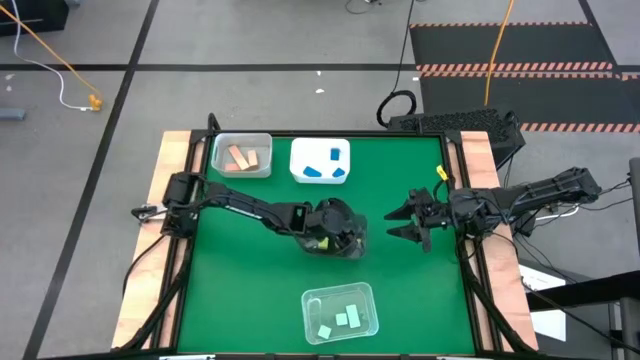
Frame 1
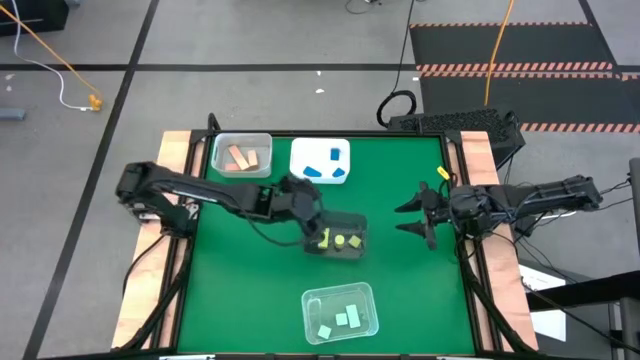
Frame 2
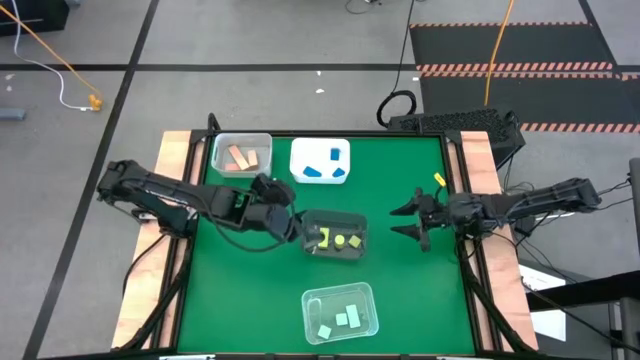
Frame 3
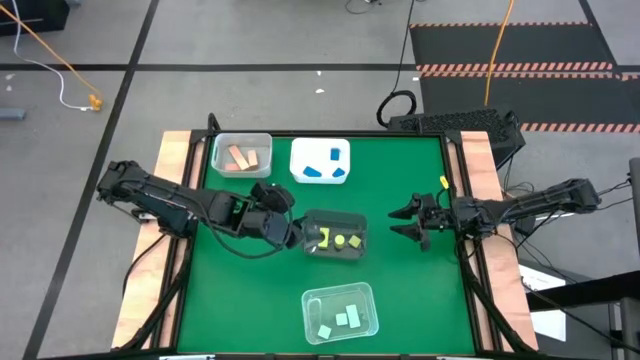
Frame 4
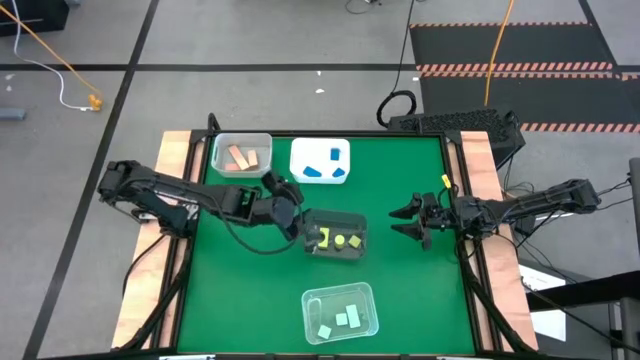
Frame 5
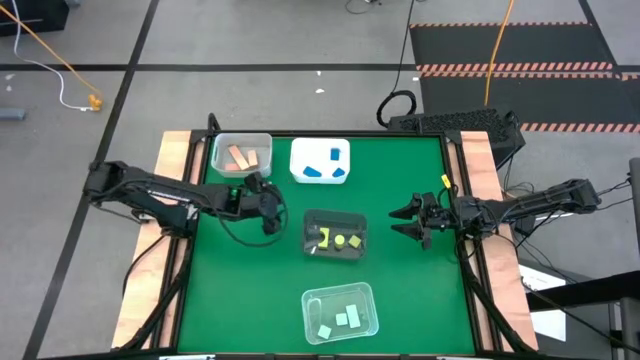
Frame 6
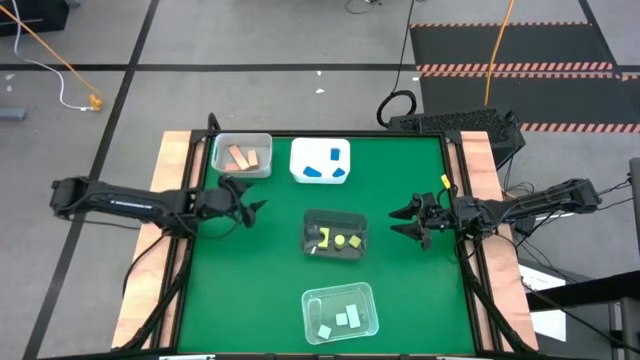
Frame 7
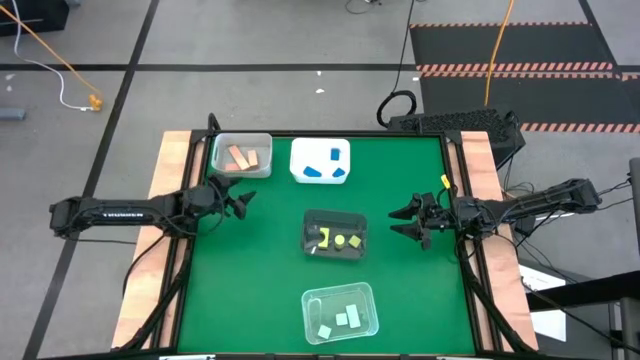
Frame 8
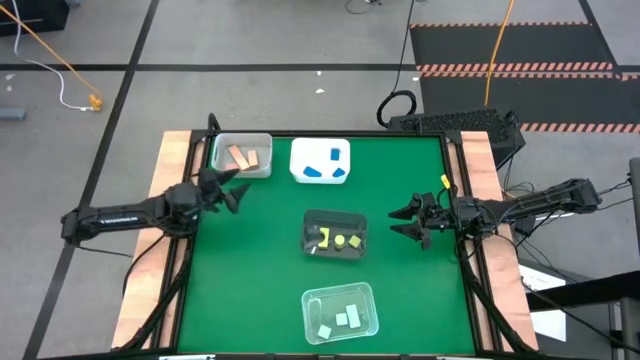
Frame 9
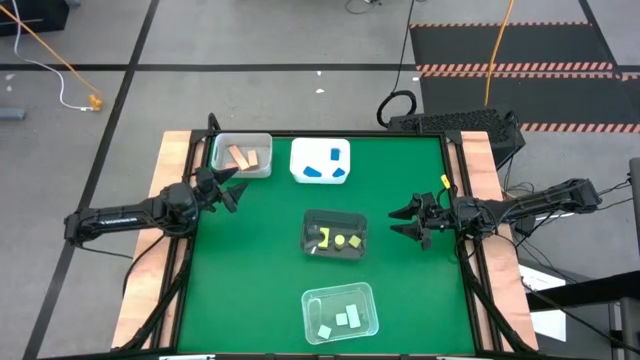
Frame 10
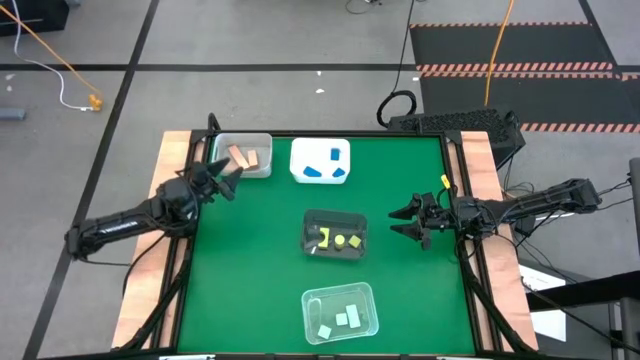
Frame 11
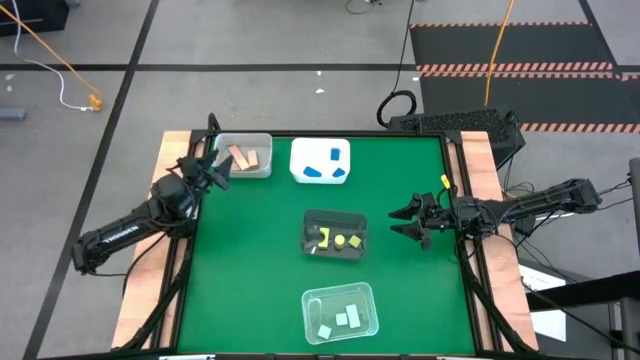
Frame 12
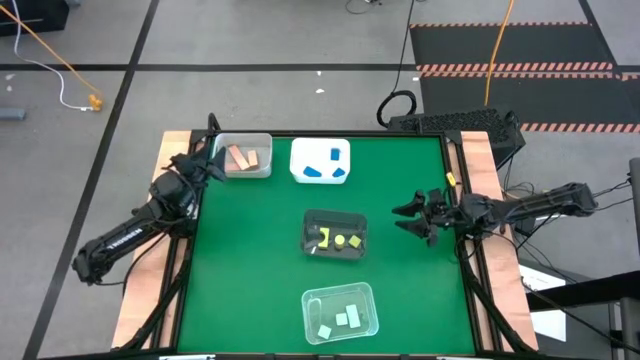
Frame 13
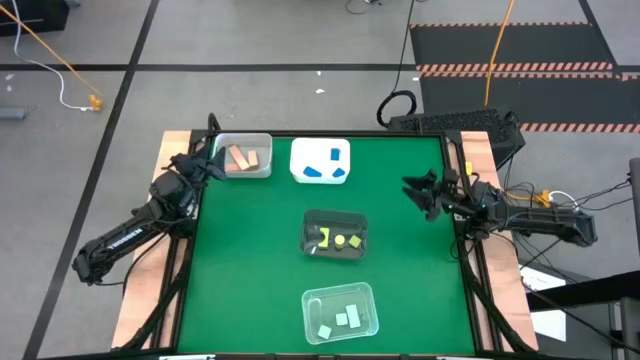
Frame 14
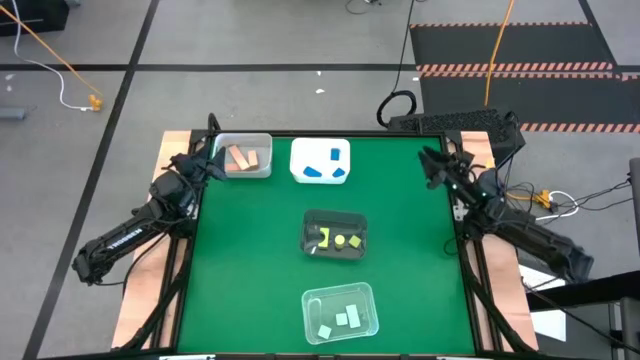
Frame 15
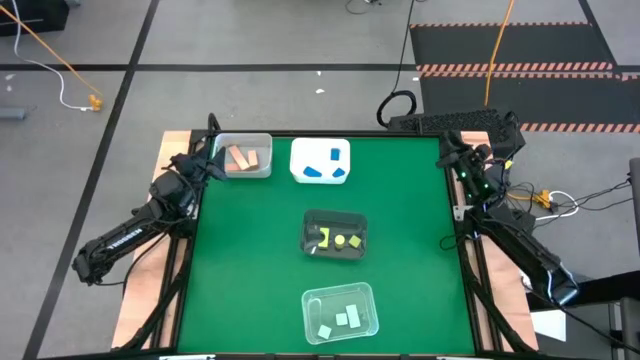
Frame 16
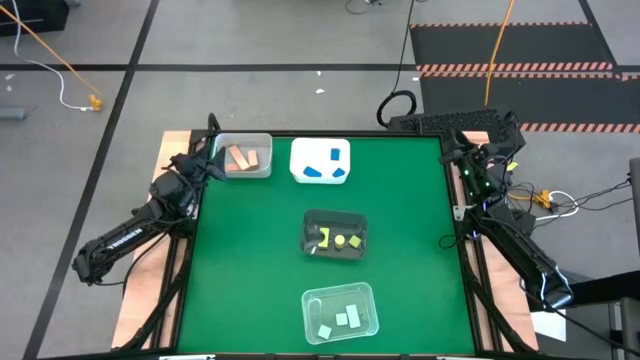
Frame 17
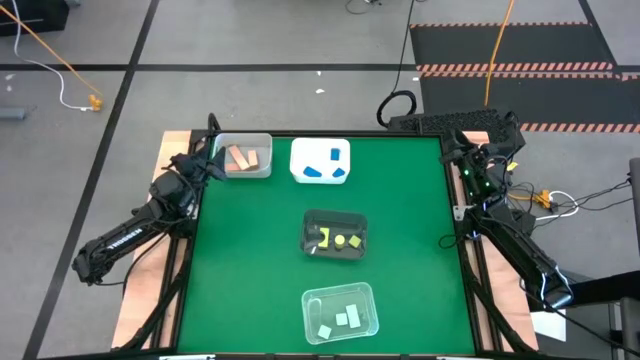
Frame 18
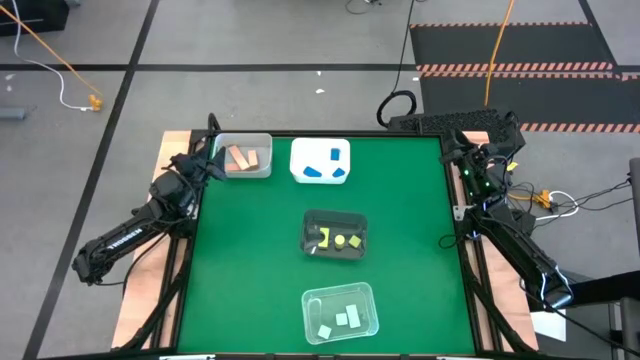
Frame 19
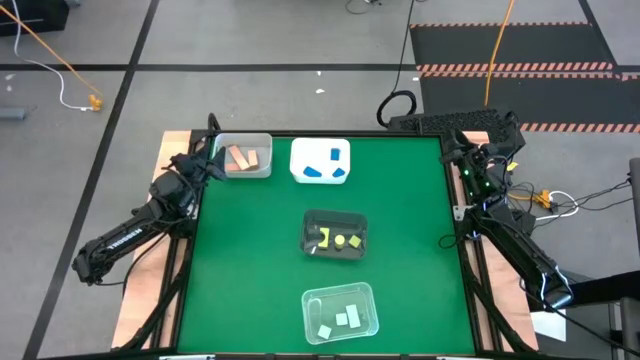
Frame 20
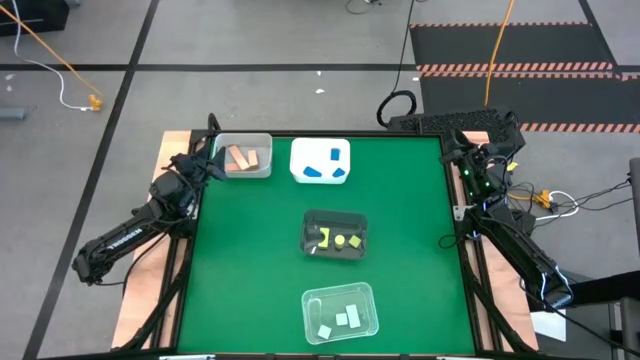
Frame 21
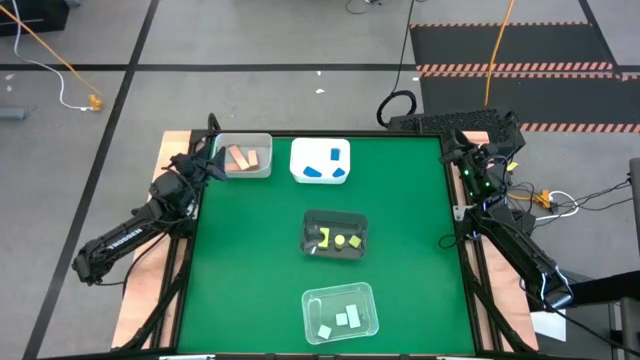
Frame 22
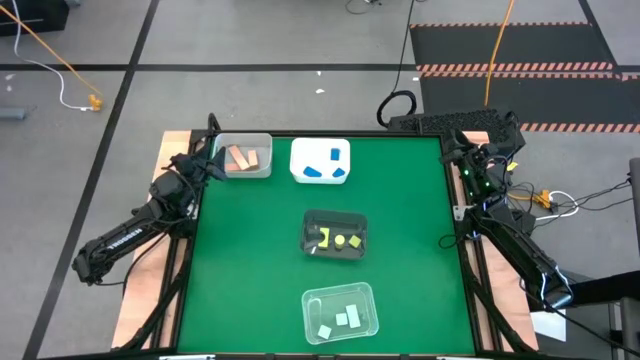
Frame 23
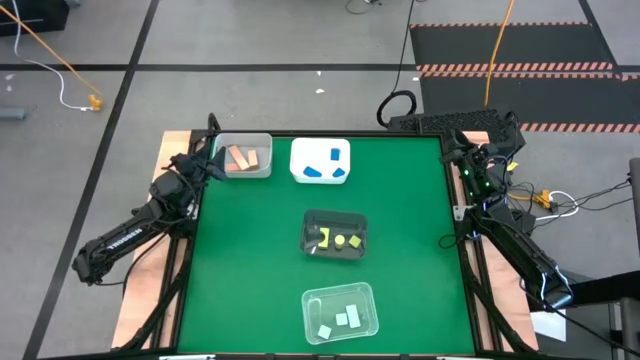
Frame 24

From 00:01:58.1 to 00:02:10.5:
Task: Sort & place blocks by color
Return to Home Position

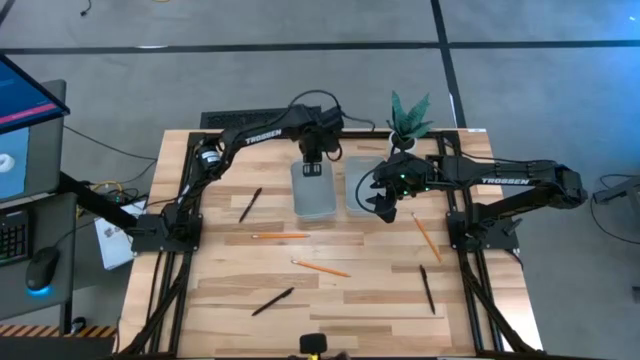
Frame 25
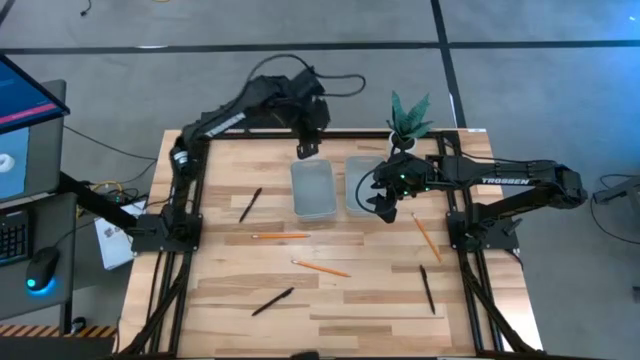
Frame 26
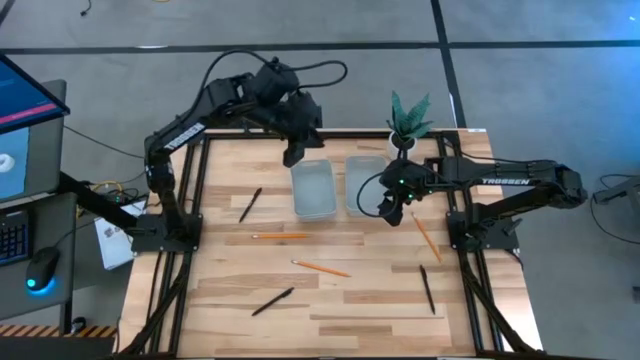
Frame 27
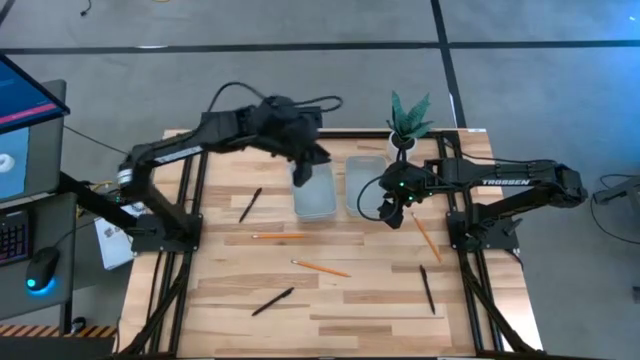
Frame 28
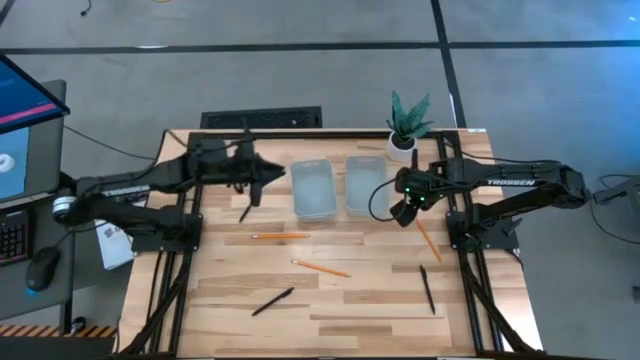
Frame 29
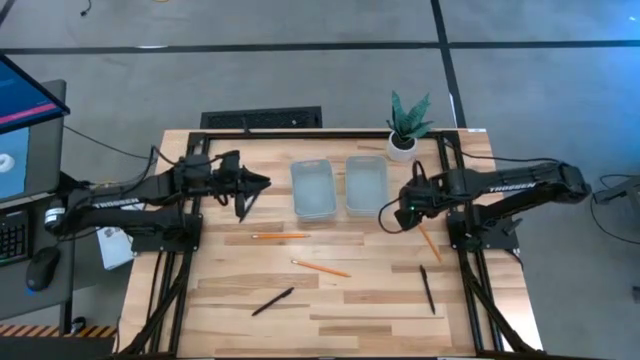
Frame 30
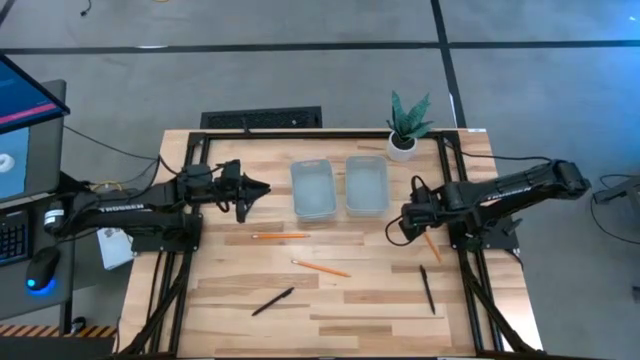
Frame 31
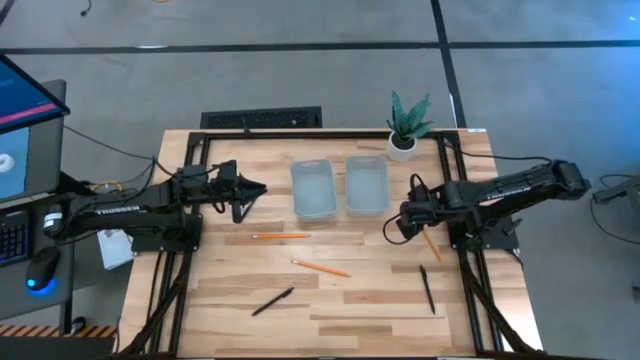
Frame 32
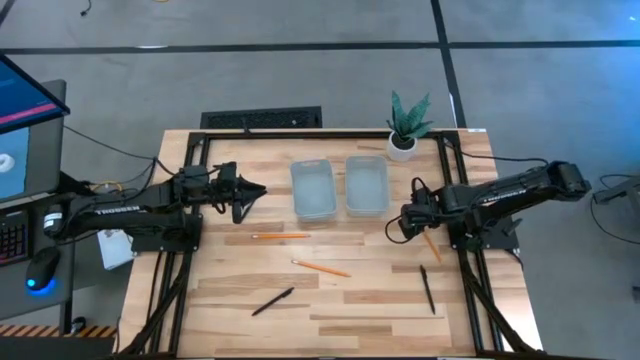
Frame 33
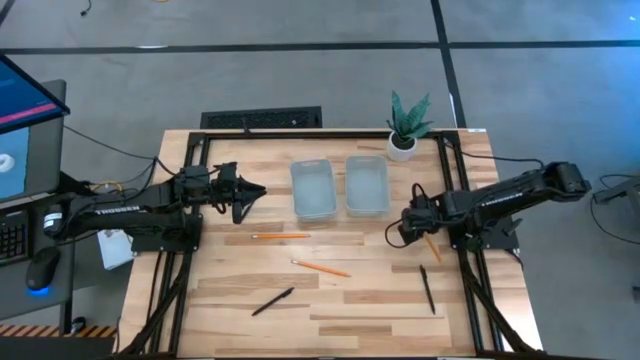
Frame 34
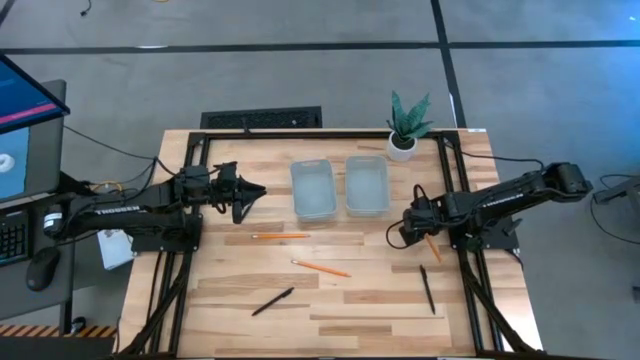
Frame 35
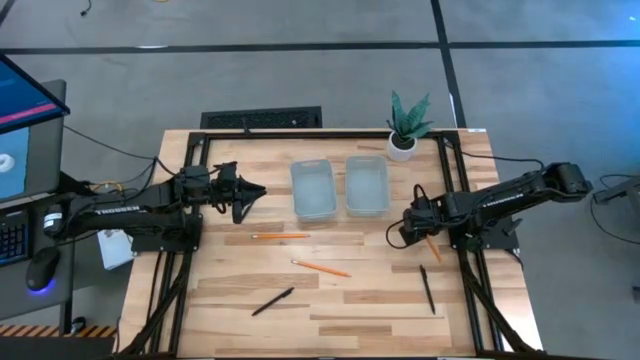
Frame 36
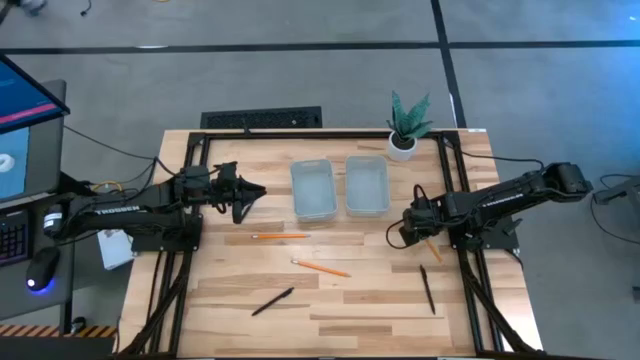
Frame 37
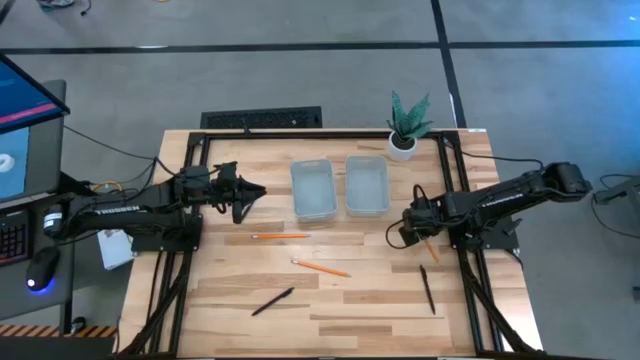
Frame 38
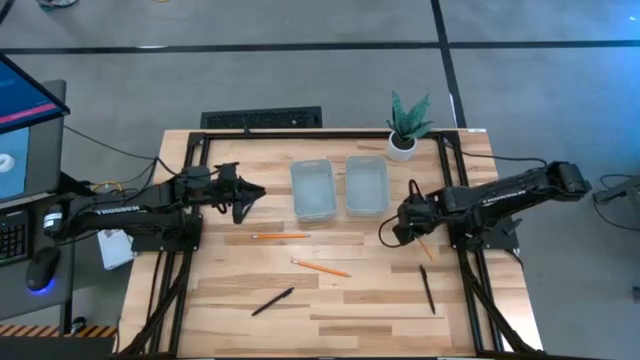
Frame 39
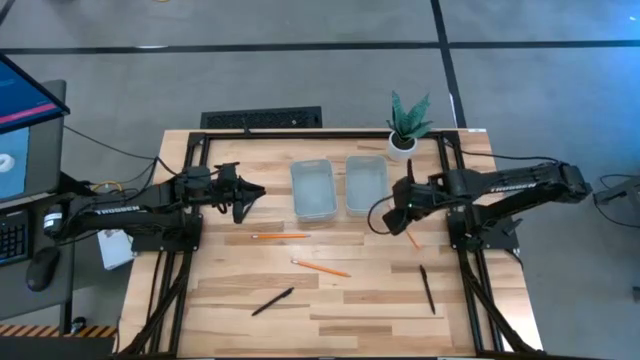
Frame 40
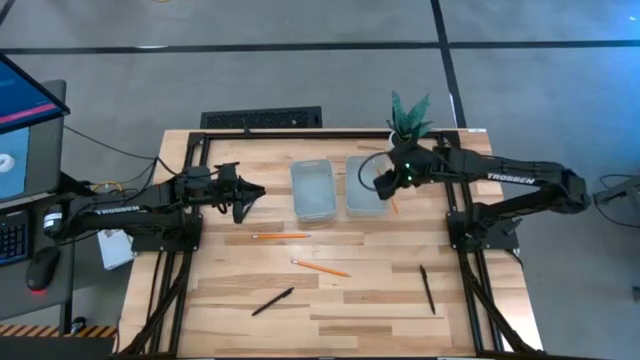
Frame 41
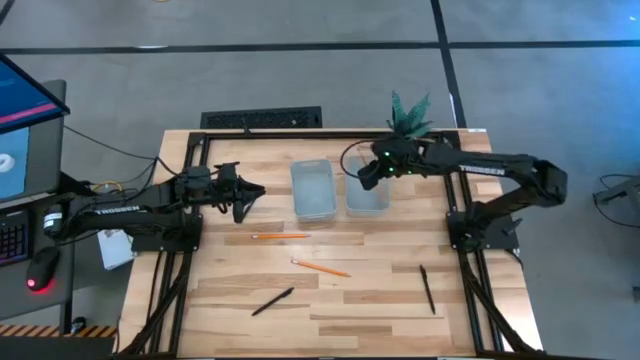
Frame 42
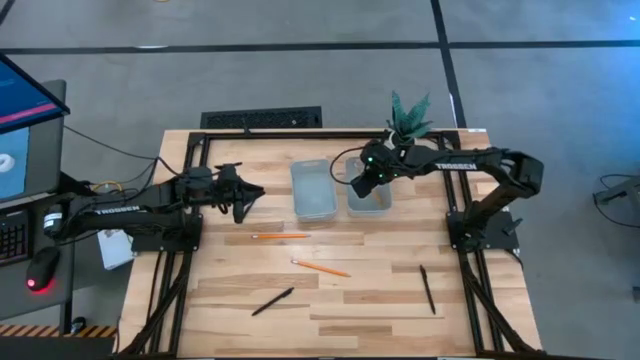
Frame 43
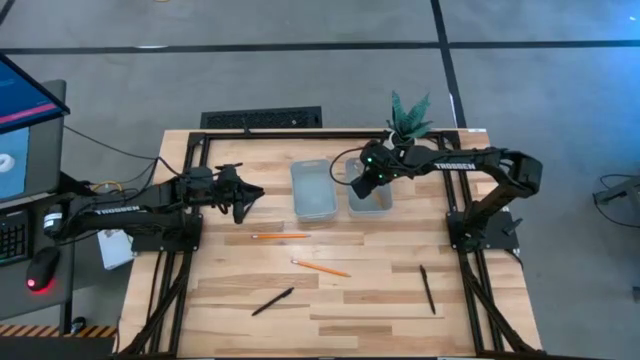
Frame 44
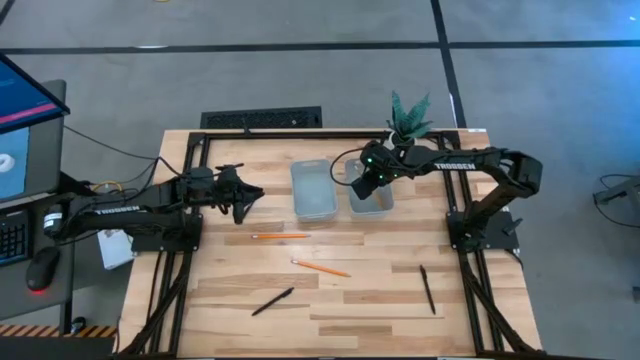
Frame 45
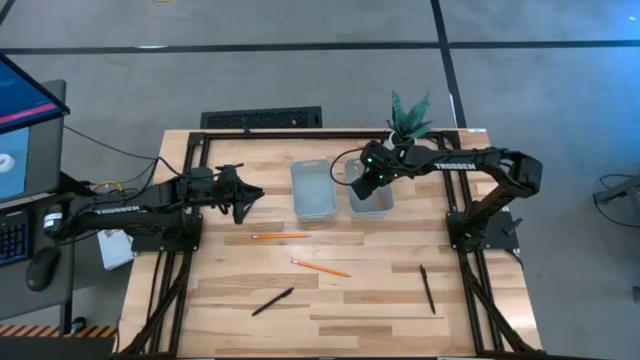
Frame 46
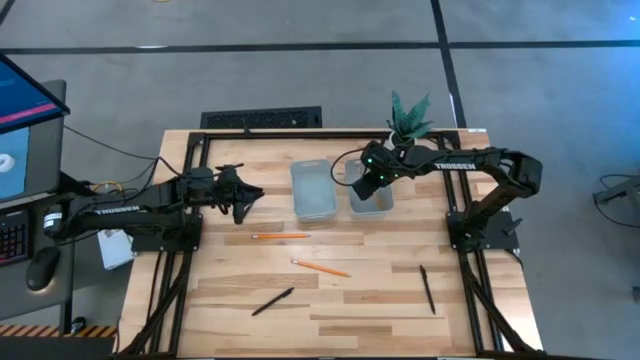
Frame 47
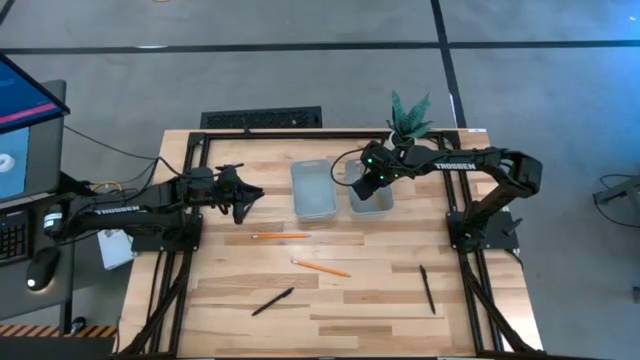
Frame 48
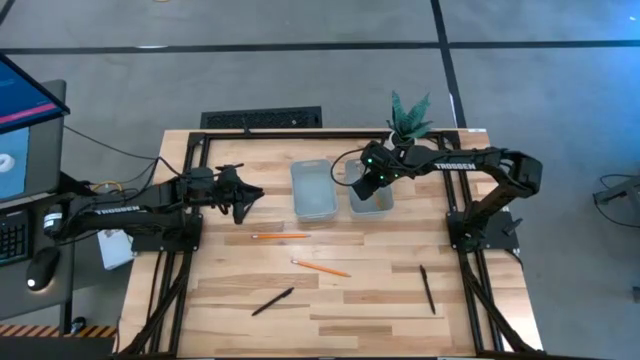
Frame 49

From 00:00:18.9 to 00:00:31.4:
Task: Sort pens & pencils
Put the right yellow pencil into the right gray bin
